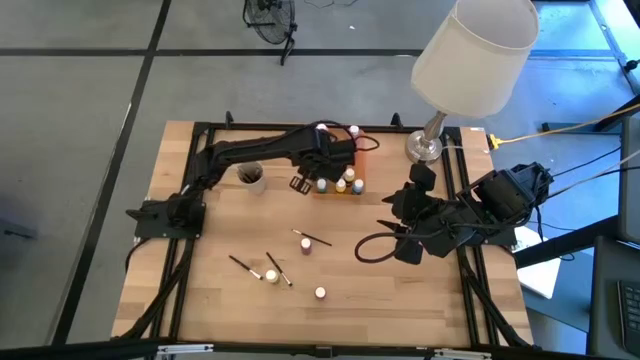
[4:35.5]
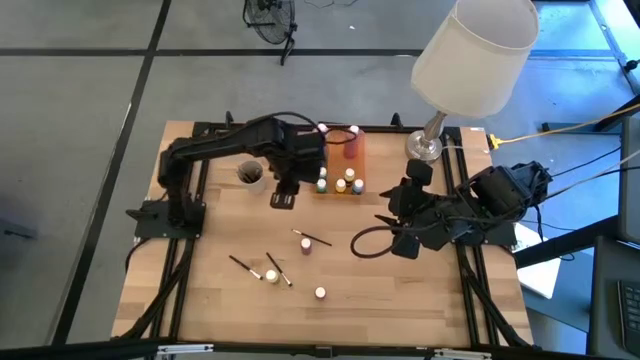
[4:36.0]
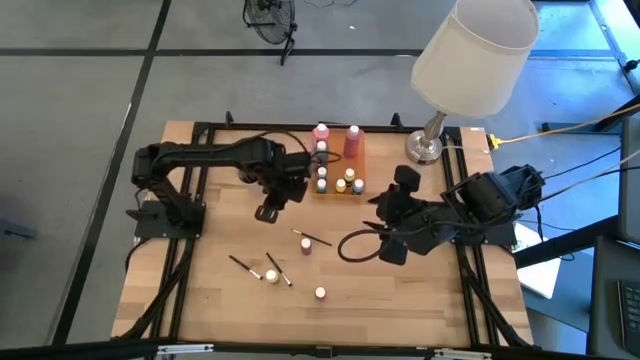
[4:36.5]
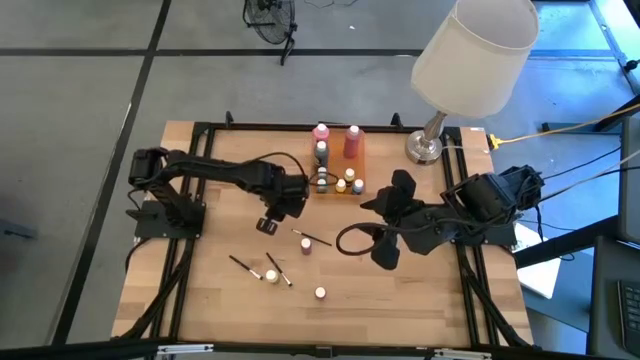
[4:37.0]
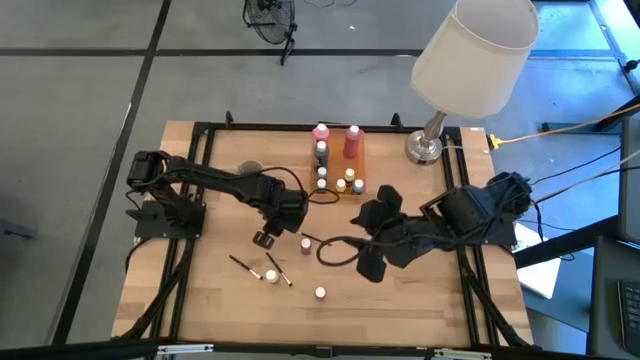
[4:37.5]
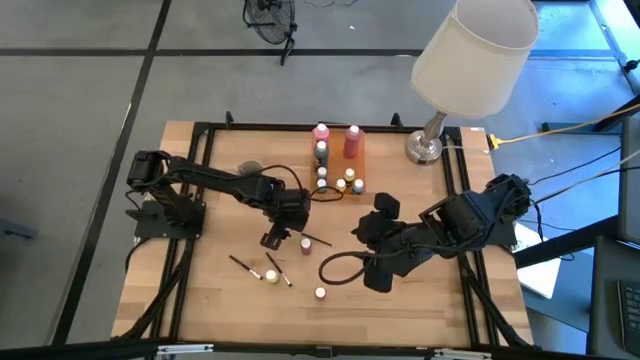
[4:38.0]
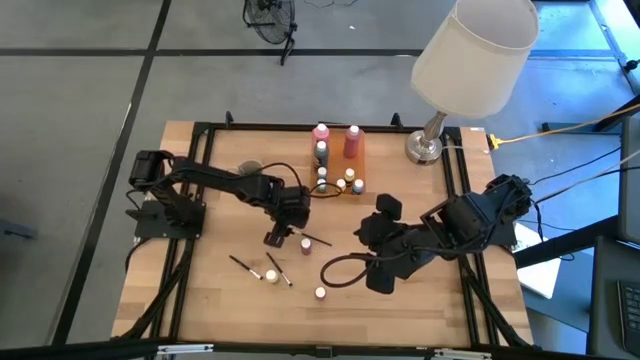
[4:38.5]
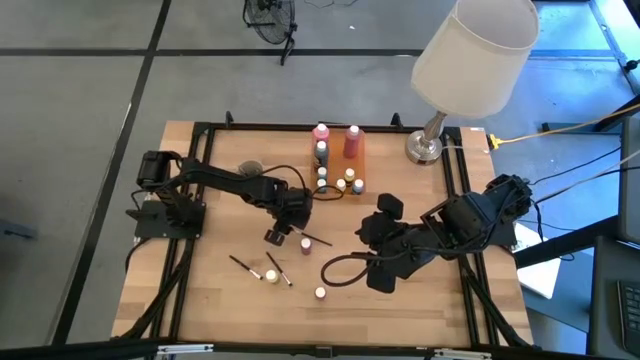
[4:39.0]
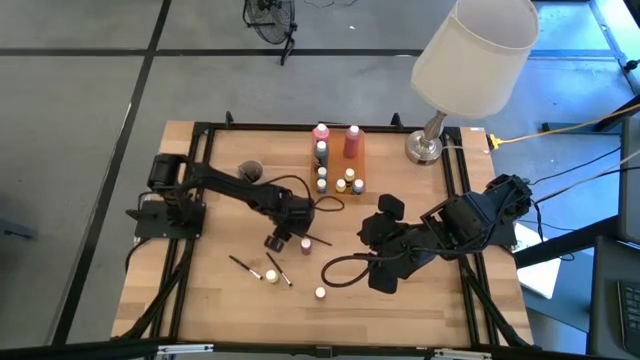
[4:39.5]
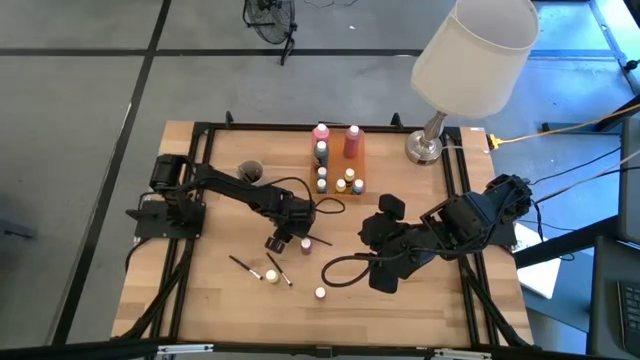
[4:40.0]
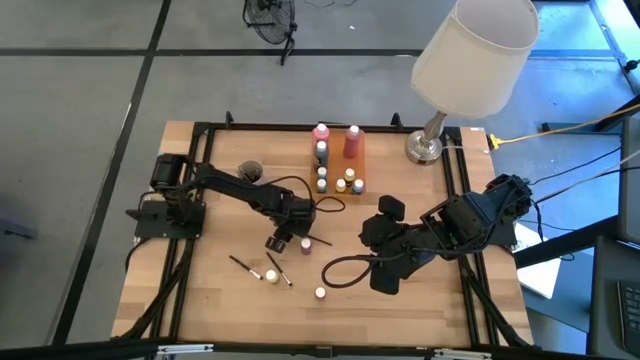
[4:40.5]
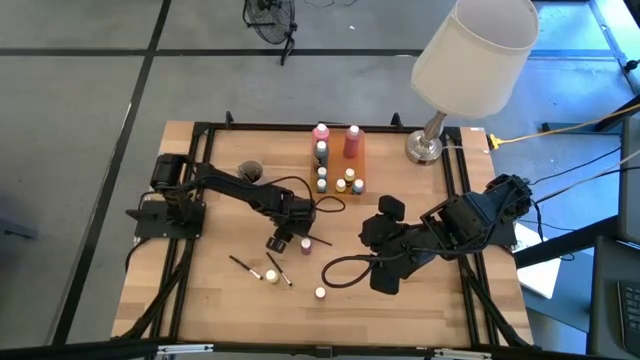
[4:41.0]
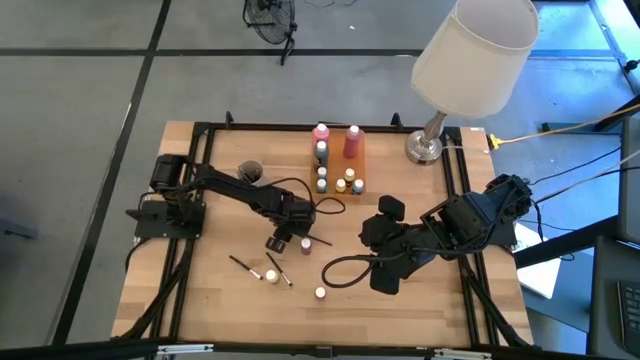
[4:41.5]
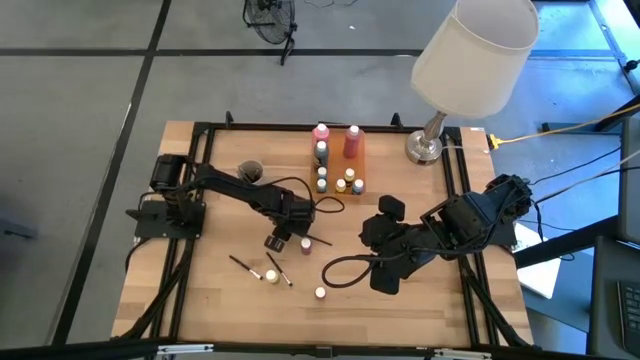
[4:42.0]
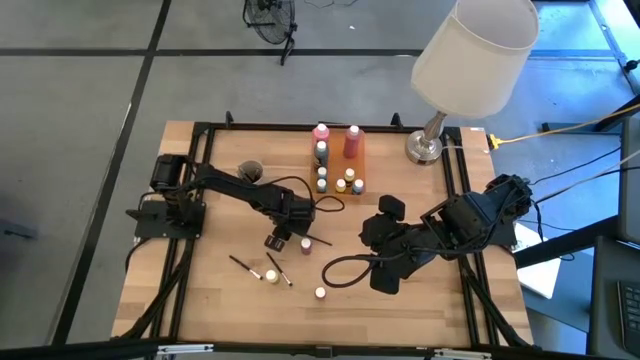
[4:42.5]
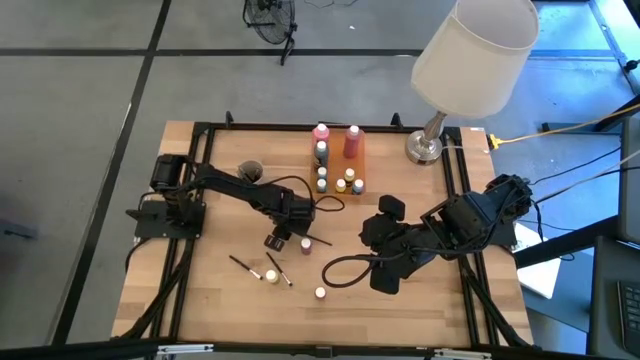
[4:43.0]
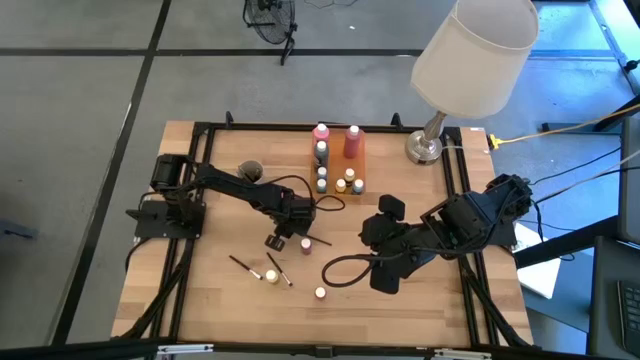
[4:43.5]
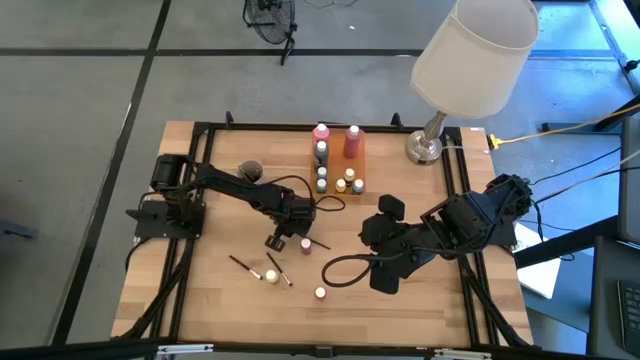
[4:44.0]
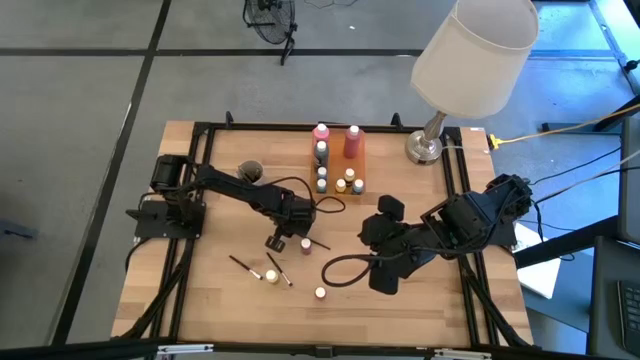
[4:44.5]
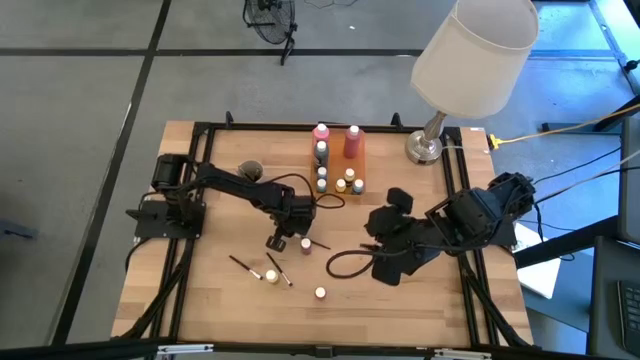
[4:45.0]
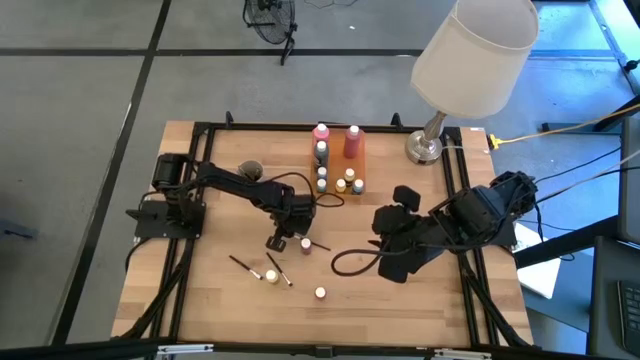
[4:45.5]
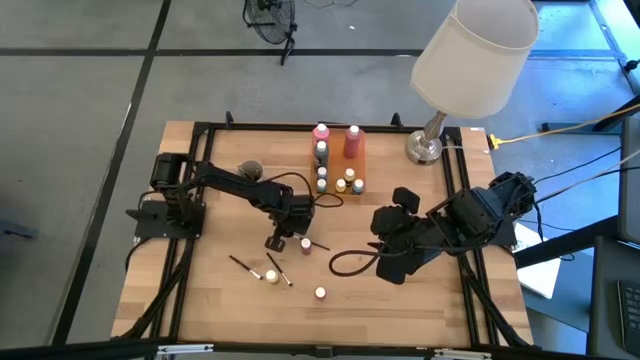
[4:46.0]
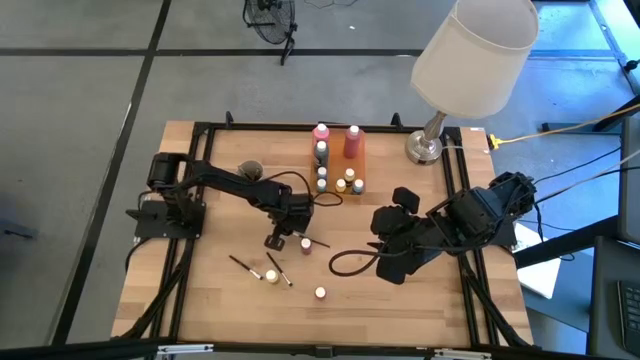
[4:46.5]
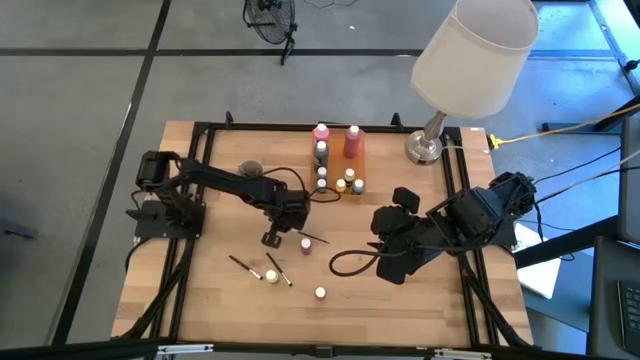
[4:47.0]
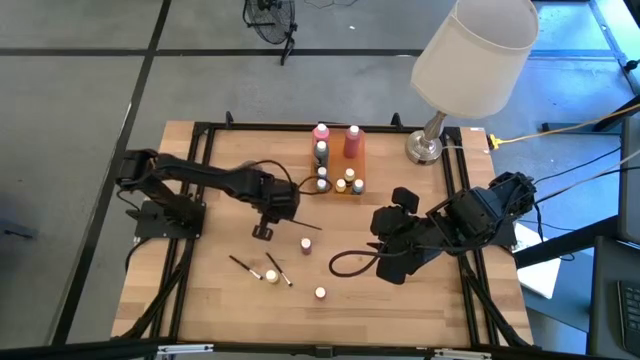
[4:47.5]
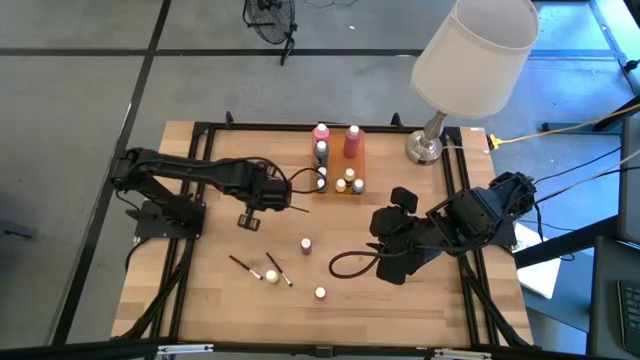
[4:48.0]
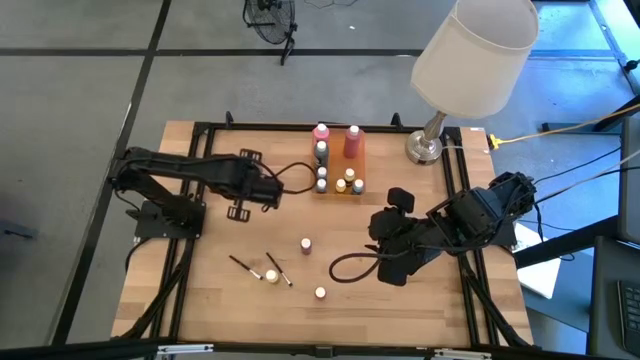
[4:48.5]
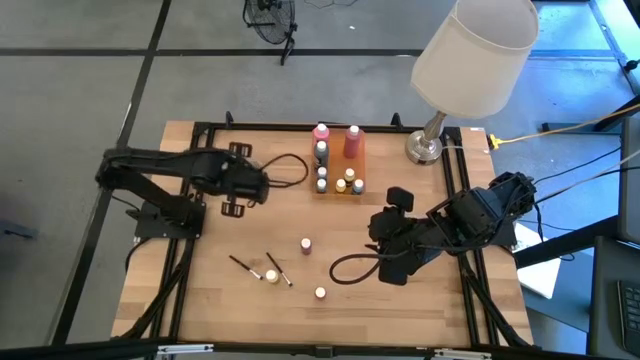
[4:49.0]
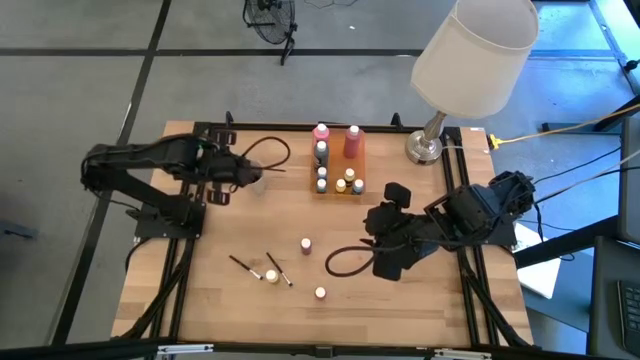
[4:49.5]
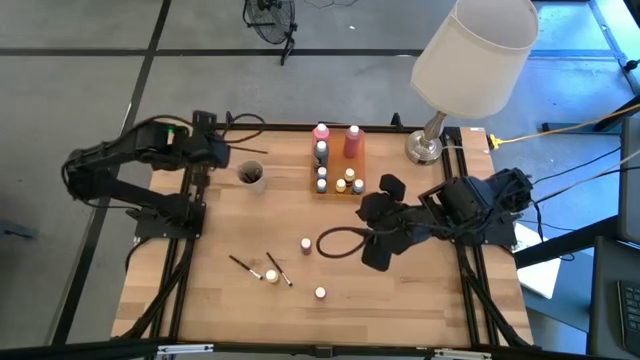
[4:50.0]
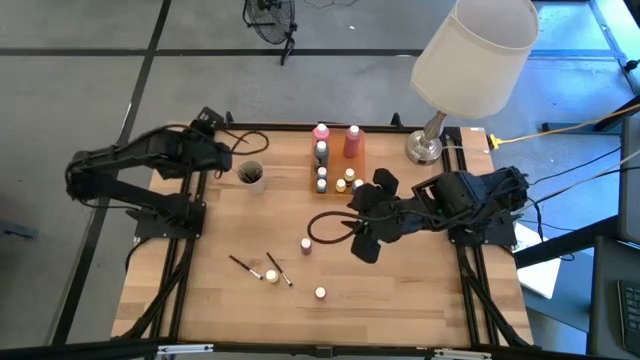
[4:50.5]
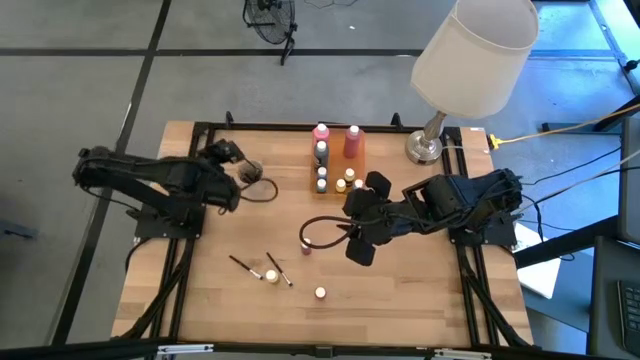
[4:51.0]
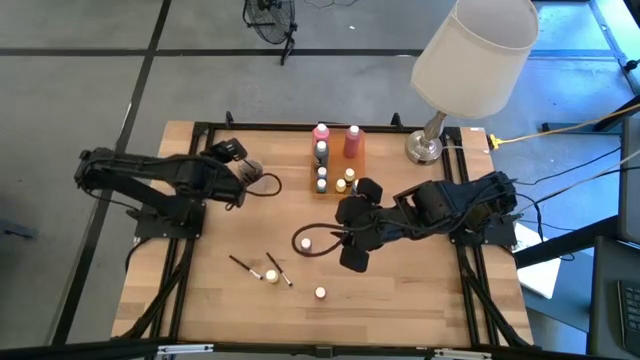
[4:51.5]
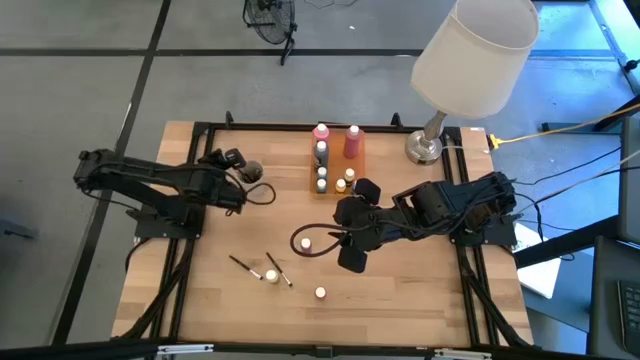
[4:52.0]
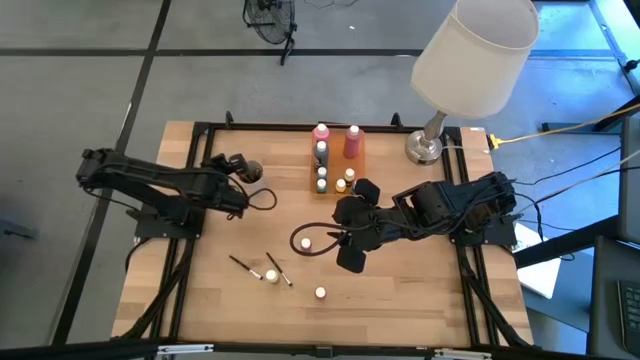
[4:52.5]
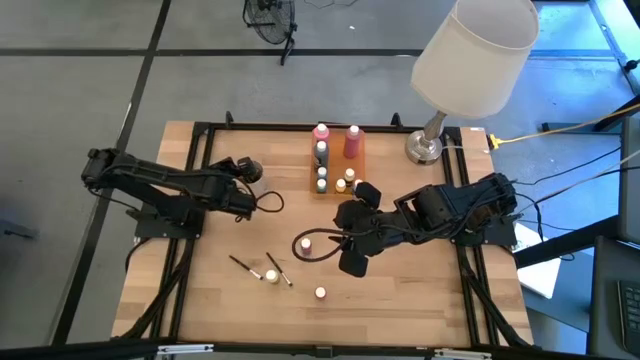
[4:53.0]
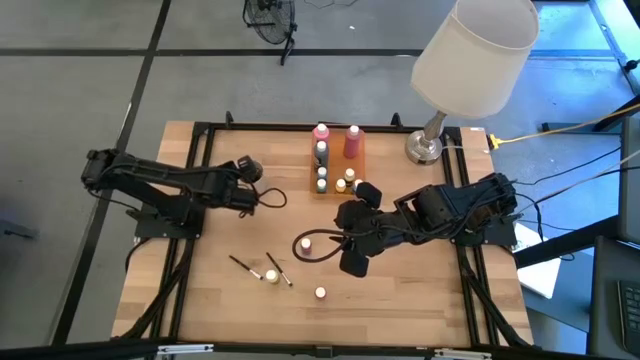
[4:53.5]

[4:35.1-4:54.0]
Task: Pick & Place Paint Supplies
Put the top silver paint brush into the white cup

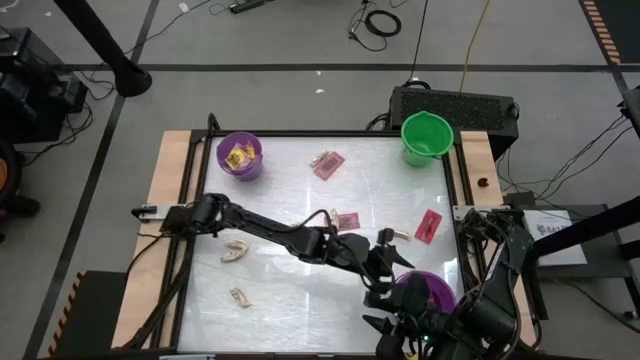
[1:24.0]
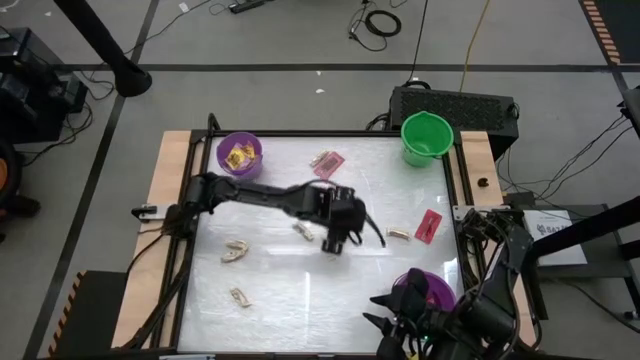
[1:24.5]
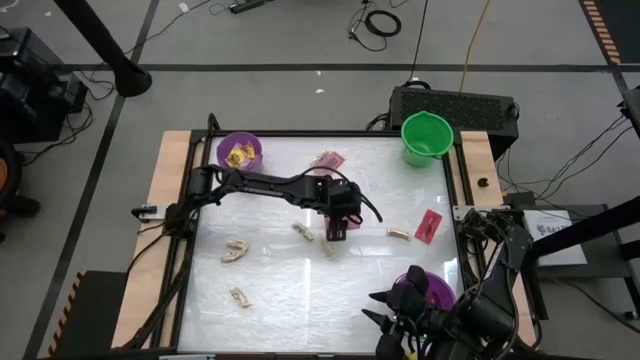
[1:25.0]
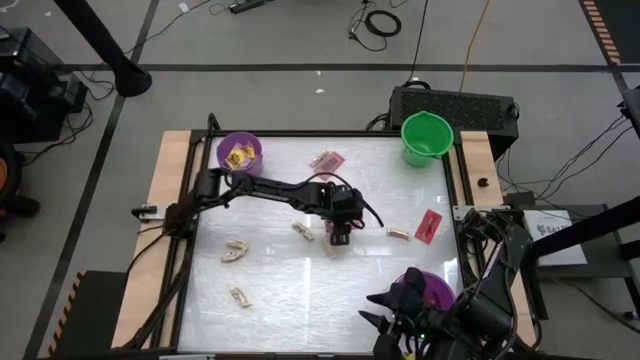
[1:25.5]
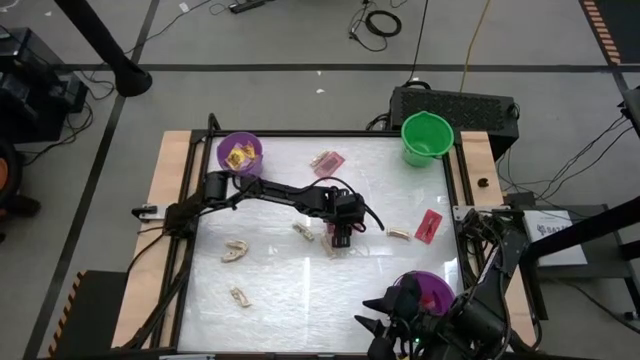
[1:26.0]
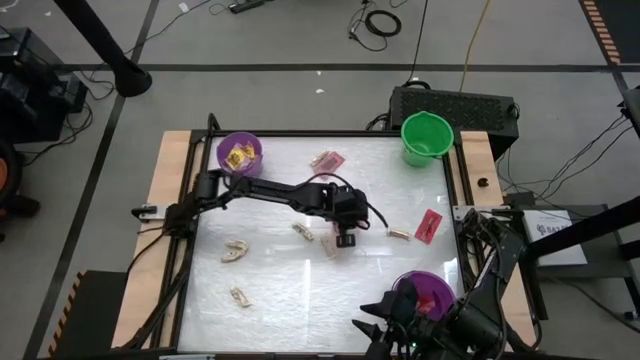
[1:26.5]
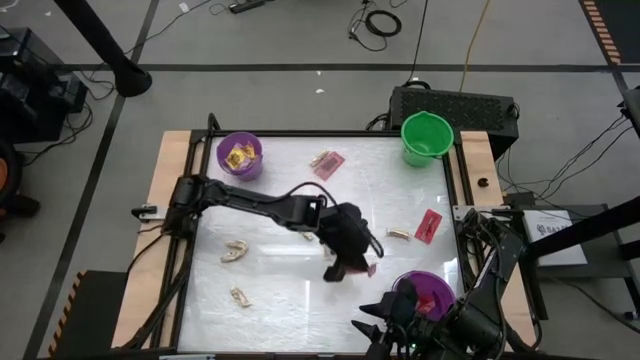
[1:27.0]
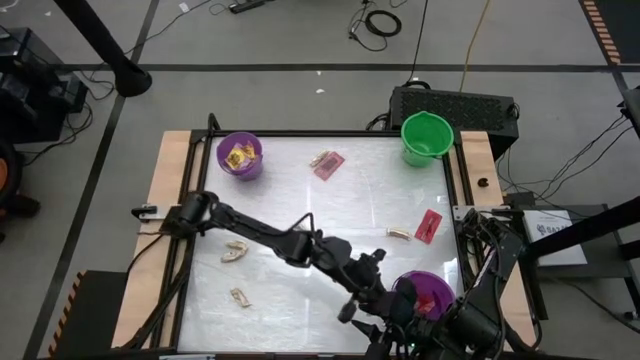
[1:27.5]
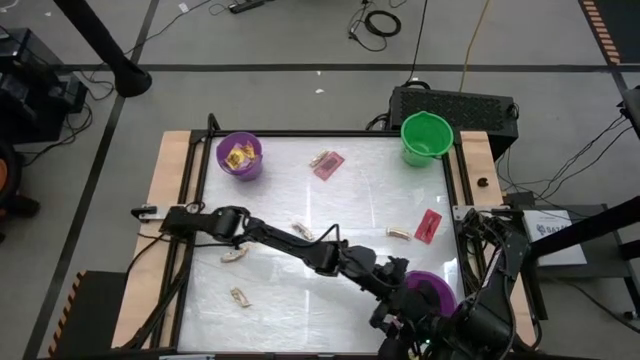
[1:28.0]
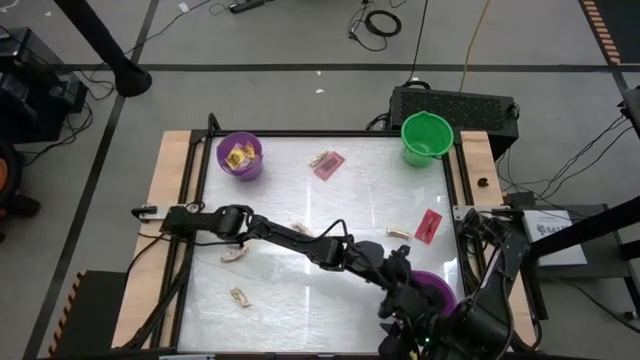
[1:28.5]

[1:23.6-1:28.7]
Task: Sort candy by brand, put in halloween buckets
Put the red candy into the bottom violet bucket
